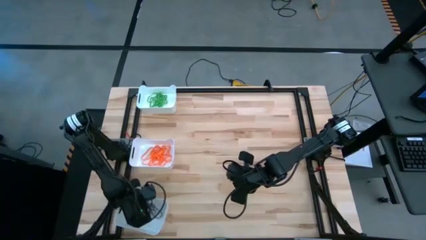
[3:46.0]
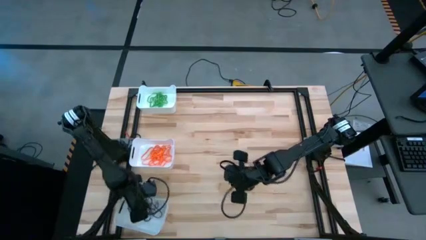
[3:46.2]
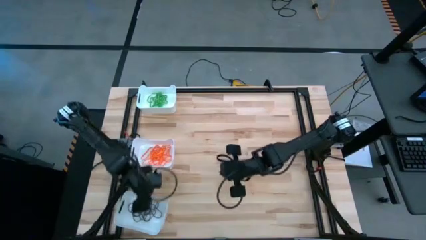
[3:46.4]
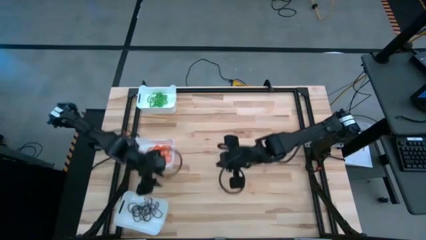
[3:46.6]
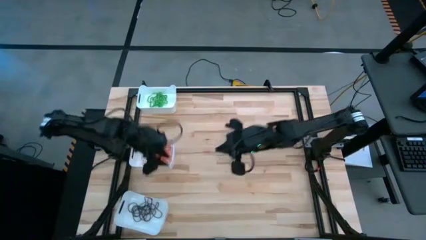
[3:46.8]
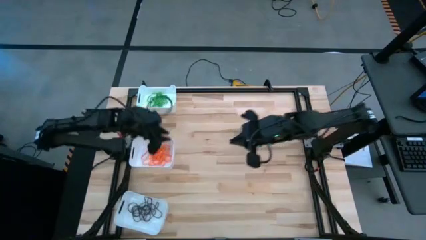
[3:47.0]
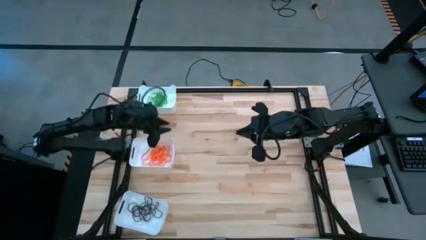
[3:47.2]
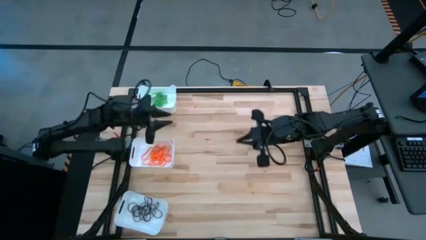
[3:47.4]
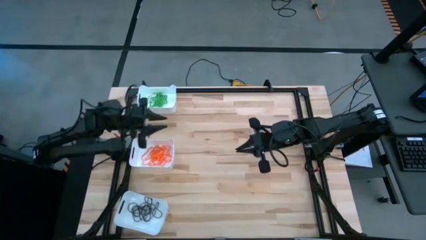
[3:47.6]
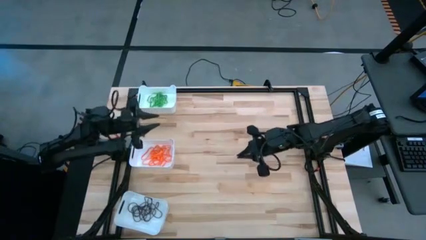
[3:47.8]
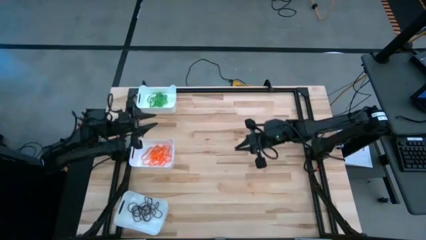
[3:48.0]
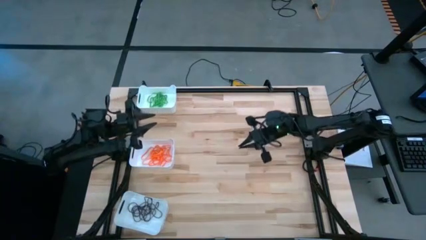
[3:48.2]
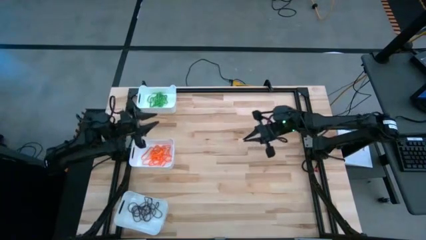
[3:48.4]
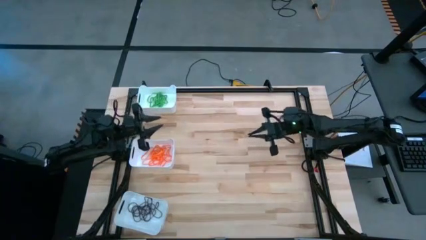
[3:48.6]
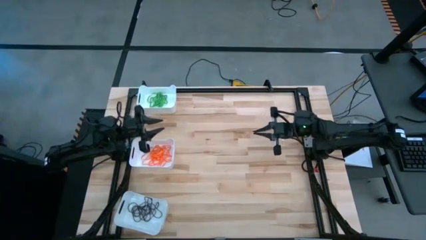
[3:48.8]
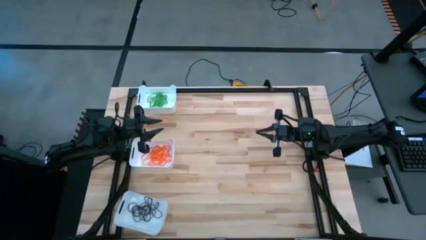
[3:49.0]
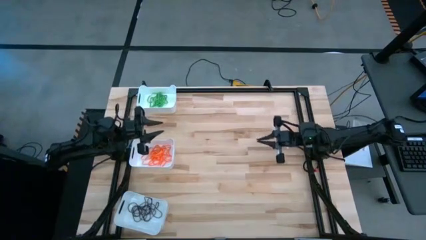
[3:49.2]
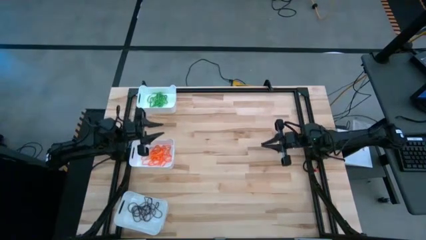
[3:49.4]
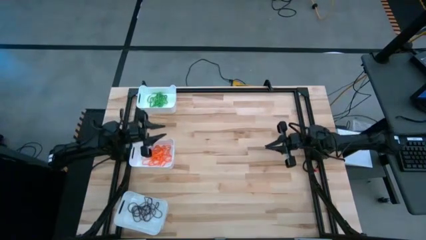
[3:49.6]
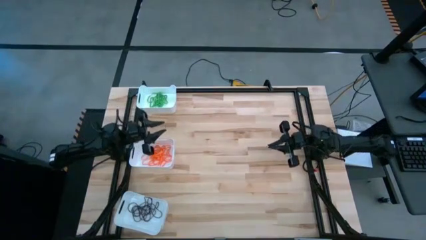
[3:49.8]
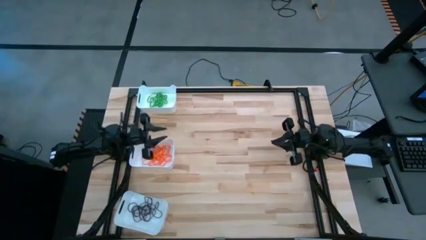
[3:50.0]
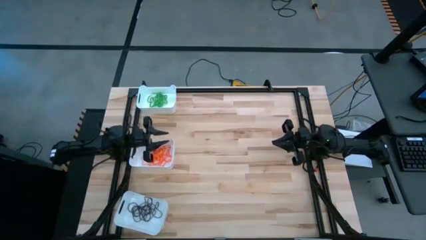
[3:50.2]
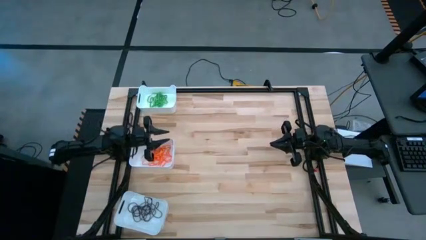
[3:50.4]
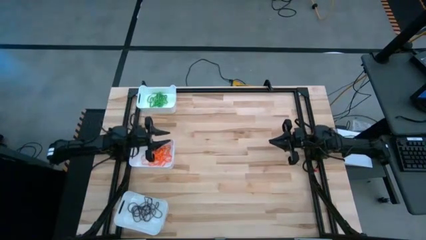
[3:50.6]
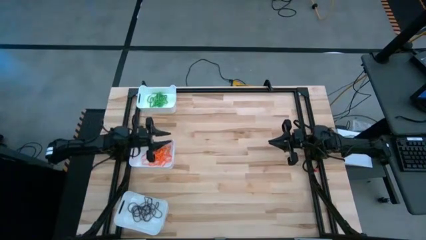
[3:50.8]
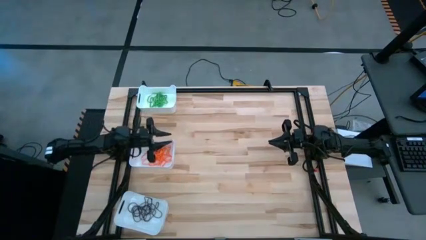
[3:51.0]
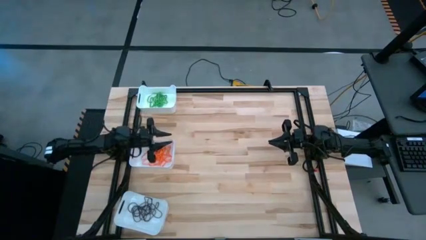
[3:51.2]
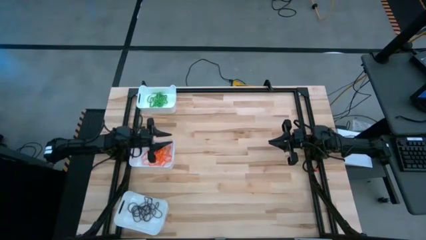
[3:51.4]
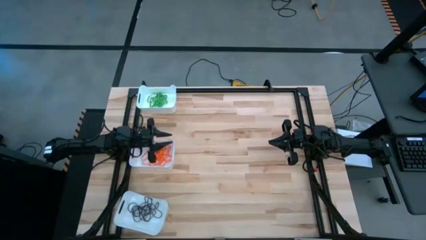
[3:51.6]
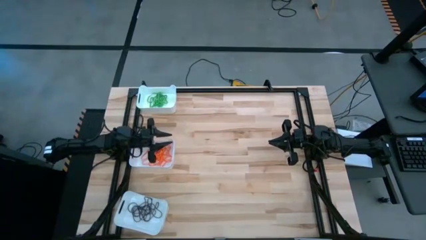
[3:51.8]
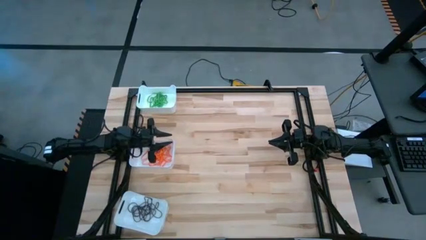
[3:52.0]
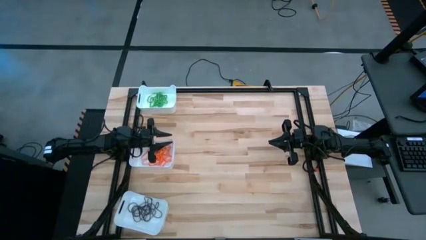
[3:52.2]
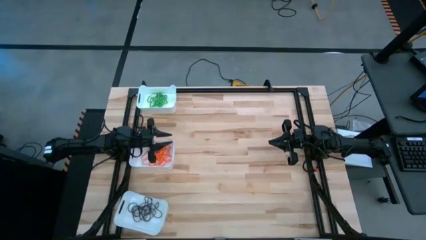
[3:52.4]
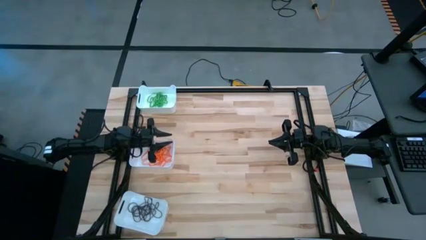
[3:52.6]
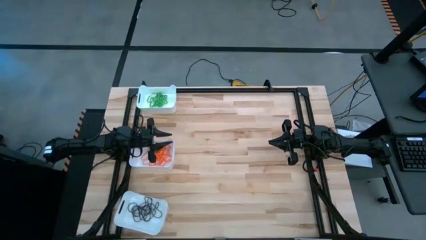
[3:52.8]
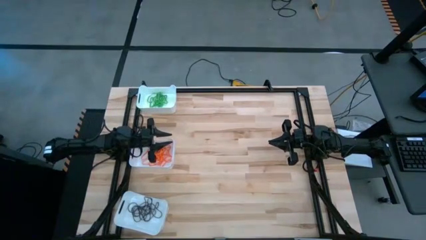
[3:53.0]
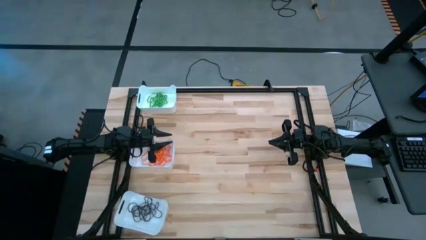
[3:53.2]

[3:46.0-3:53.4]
Task: Sort rubber bands into baskets
Return to Home Position

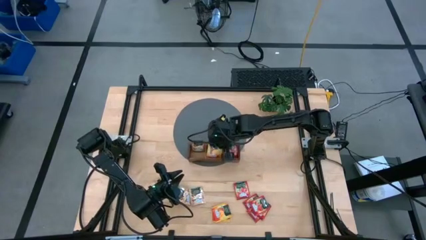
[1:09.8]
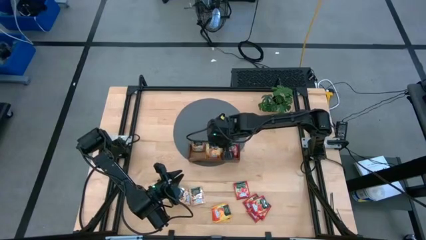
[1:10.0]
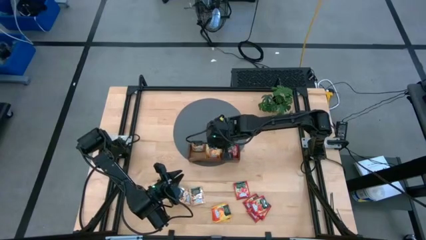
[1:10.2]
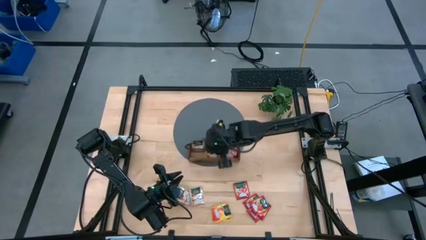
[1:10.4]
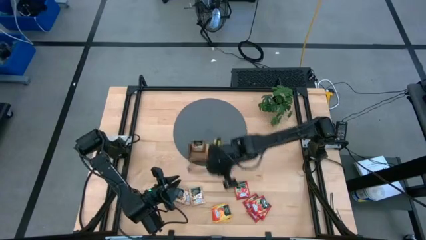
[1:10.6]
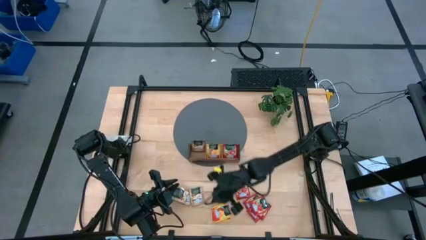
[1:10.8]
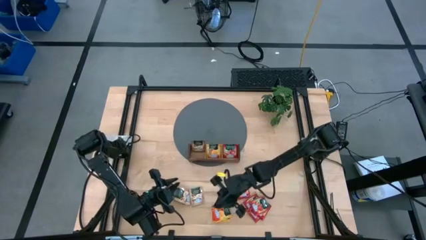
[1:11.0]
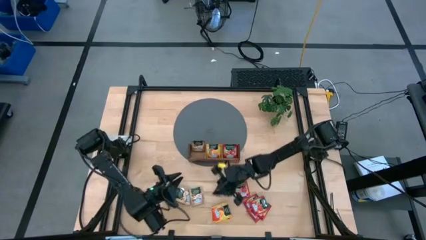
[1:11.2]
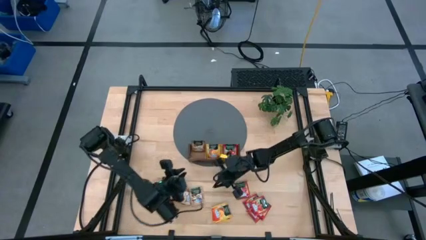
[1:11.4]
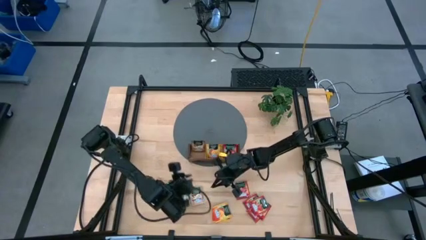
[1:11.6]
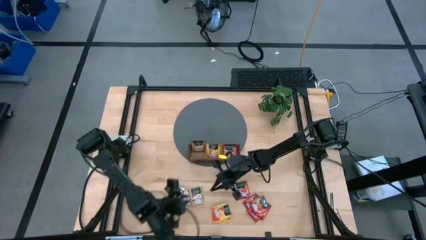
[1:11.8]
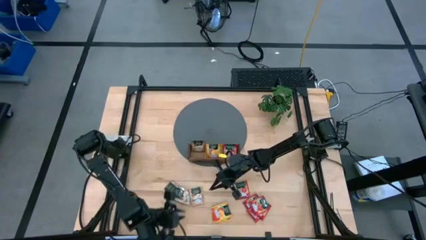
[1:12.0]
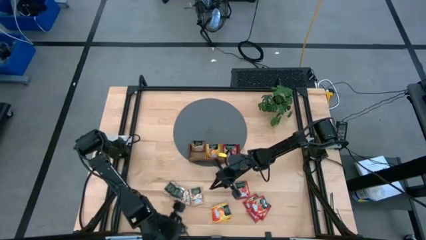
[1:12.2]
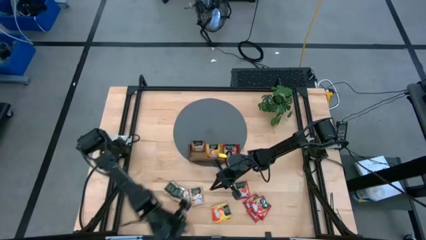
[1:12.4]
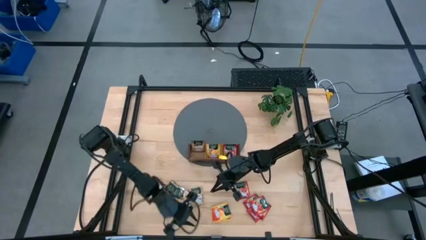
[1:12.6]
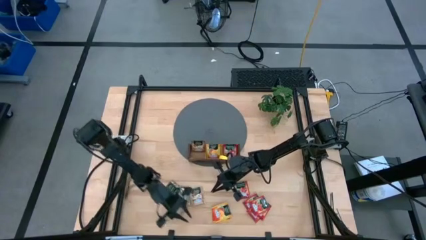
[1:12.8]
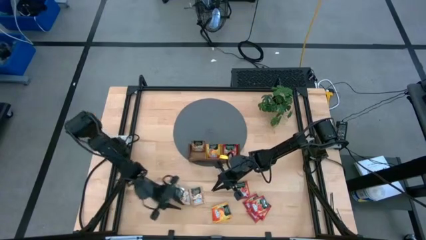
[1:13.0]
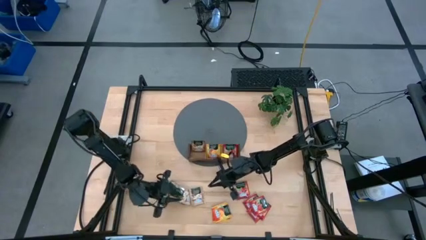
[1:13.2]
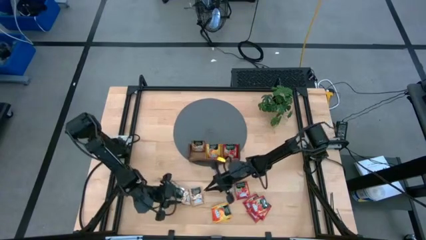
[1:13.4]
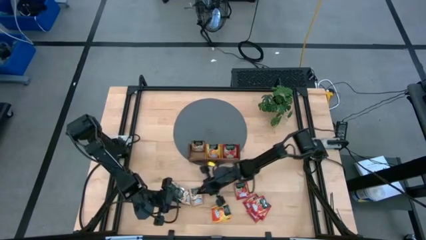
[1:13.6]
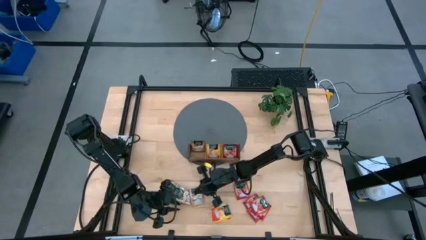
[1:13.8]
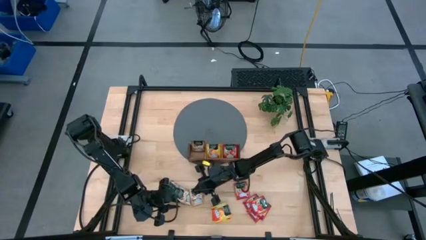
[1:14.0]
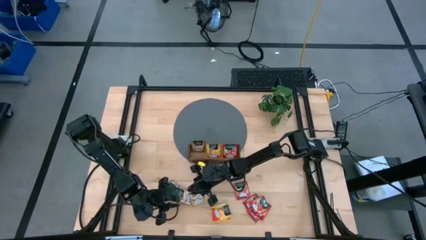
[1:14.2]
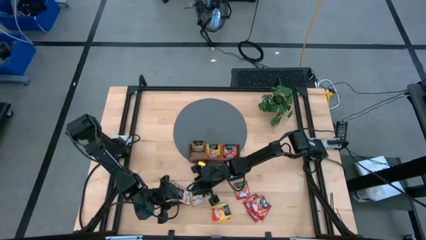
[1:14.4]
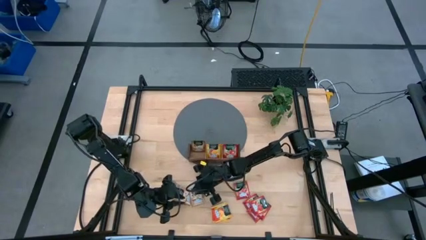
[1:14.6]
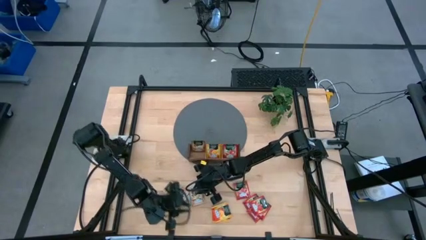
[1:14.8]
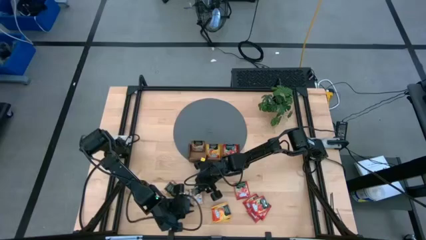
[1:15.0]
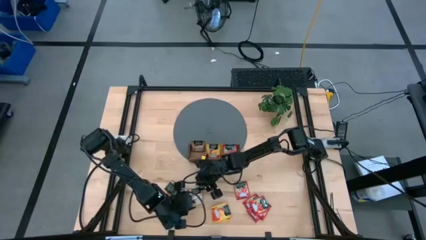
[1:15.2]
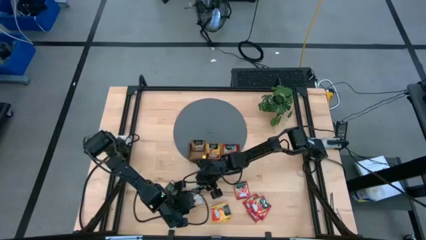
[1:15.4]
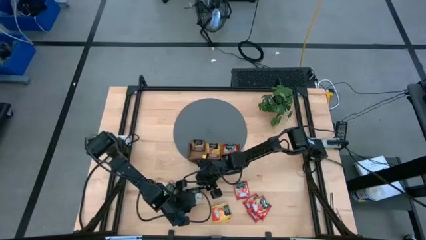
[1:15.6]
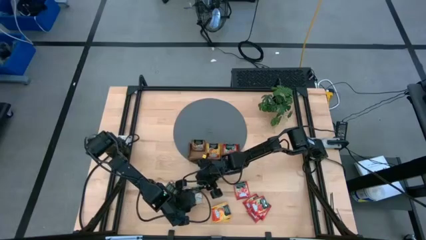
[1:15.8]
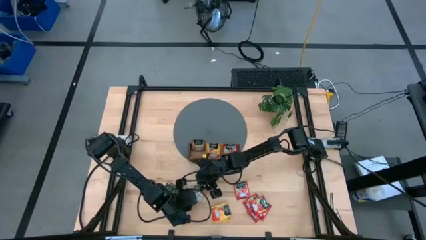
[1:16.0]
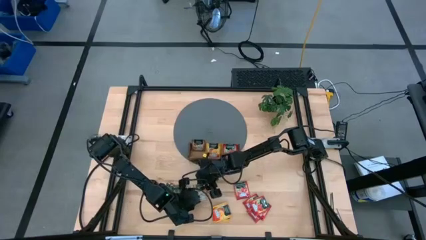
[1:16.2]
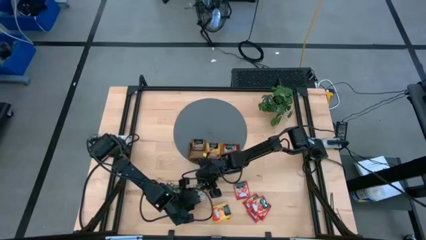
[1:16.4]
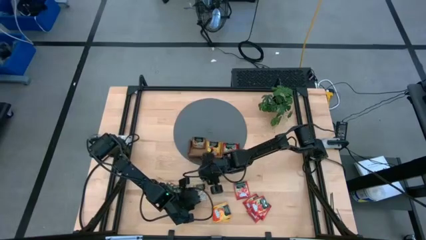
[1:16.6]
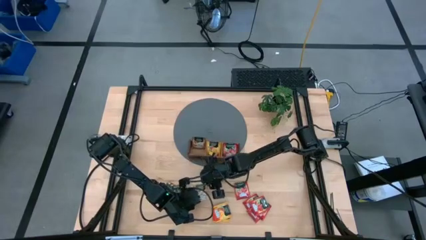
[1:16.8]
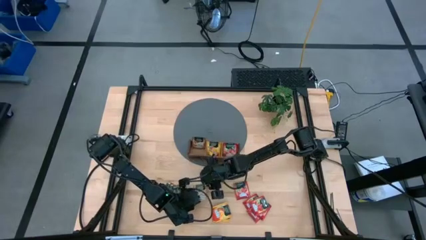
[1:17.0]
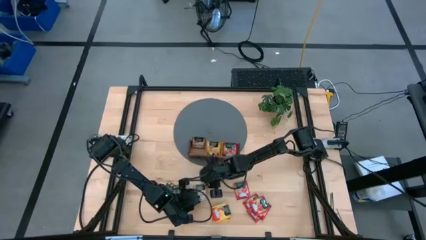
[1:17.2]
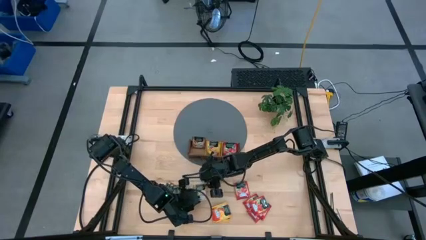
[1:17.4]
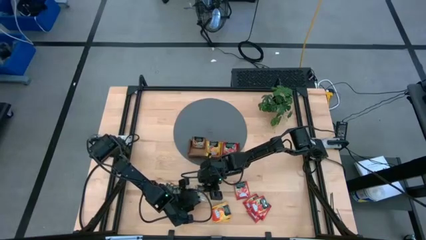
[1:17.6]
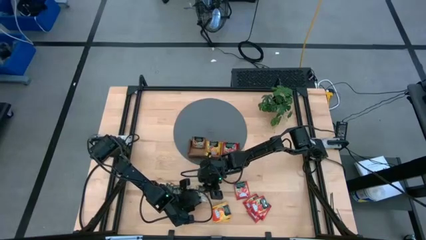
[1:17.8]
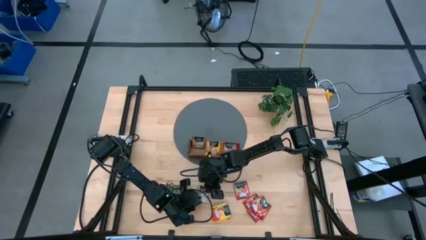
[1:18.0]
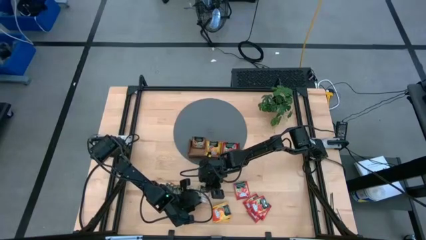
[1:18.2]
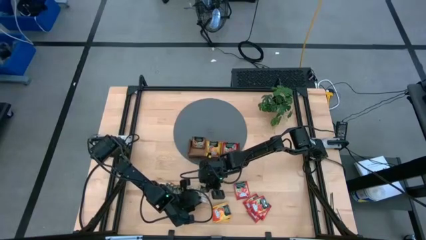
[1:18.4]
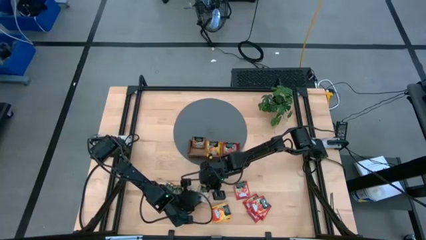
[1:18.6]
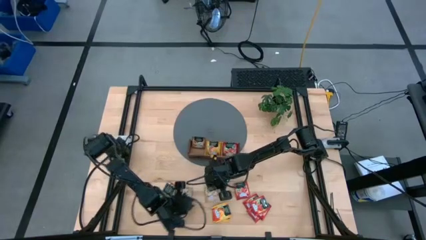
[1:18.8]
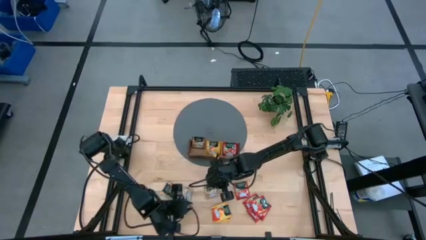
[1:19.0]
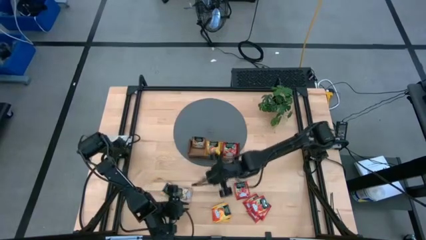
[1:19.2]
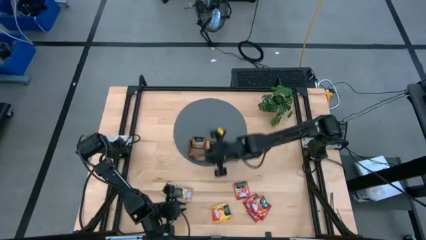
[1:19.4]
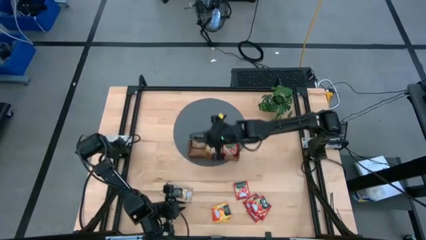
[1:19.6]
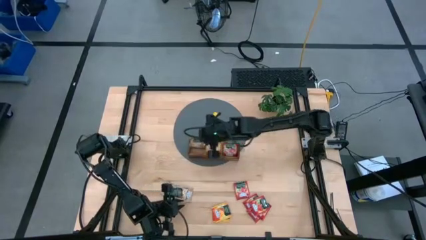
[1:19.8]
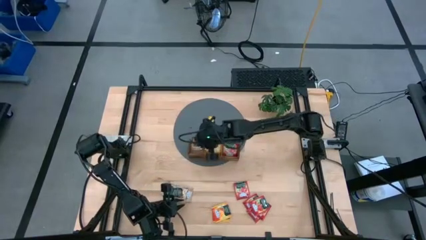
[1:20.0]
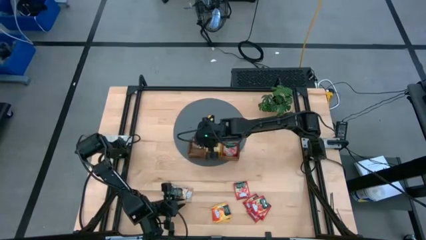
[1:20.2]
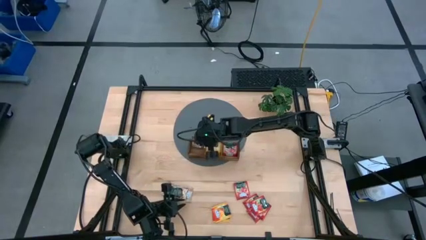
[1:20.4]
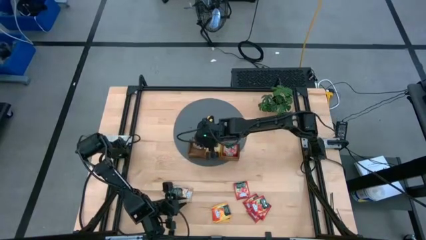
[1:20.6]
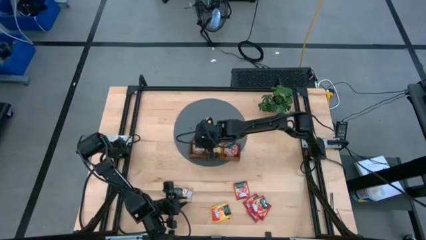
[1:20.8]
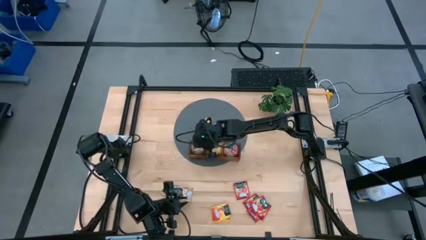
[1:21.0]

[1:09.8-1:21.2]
Task: Pick & Place Tea
Put the brown tea bag into the left section of the wooden organizer
